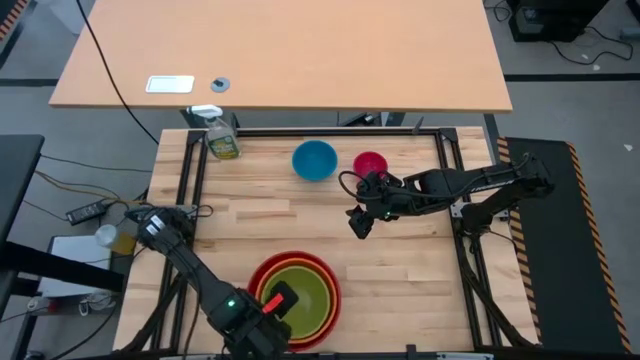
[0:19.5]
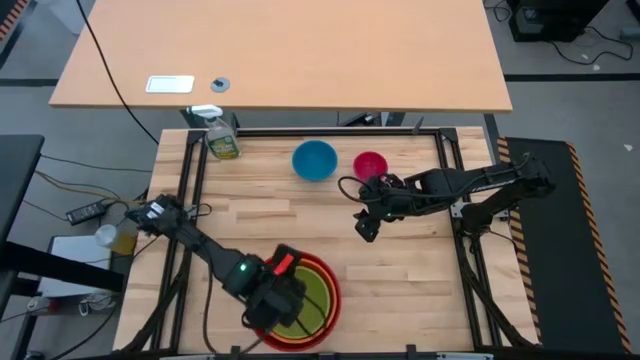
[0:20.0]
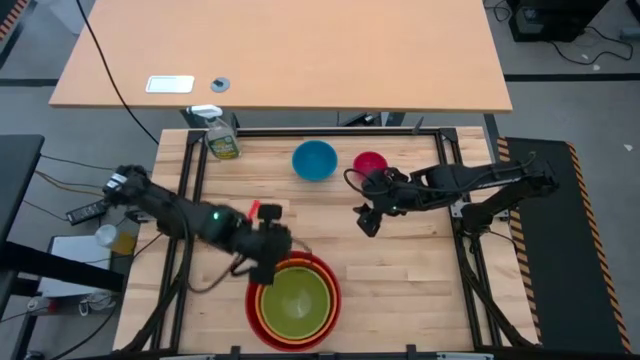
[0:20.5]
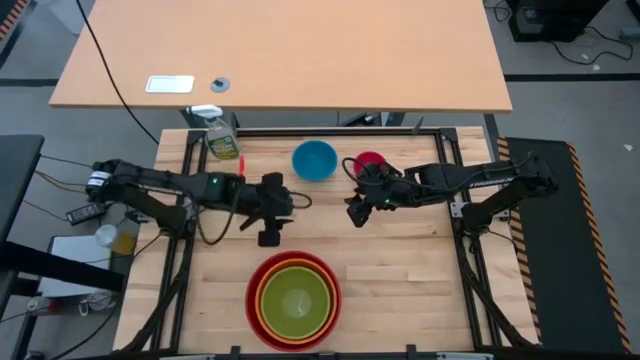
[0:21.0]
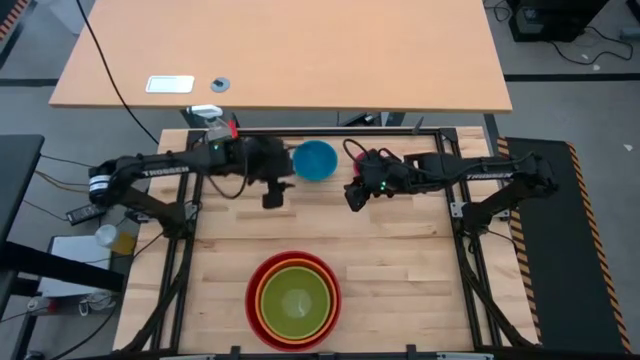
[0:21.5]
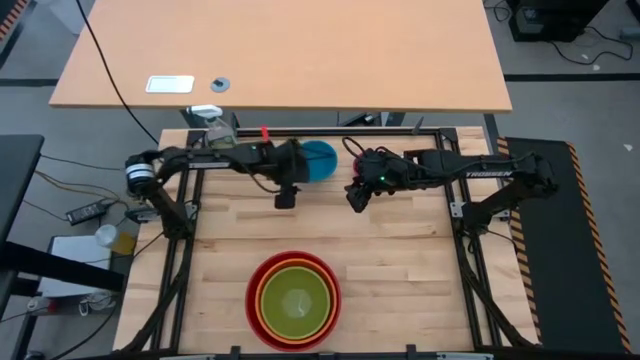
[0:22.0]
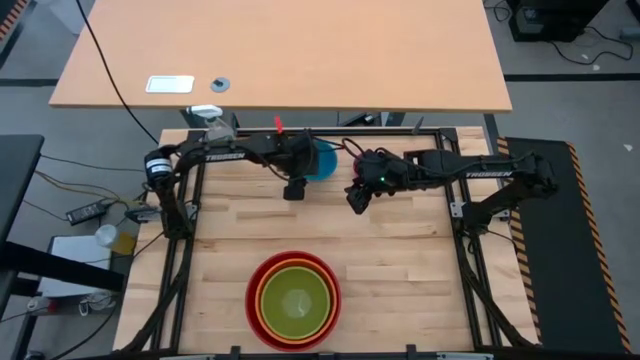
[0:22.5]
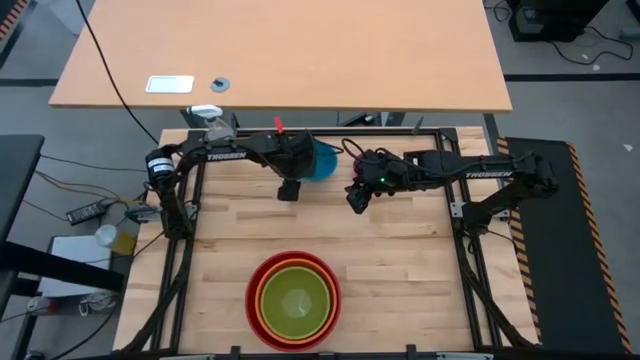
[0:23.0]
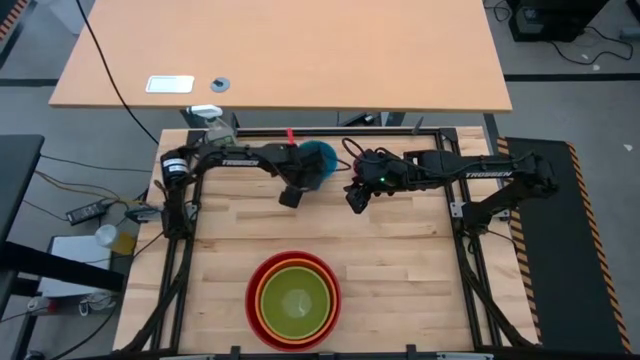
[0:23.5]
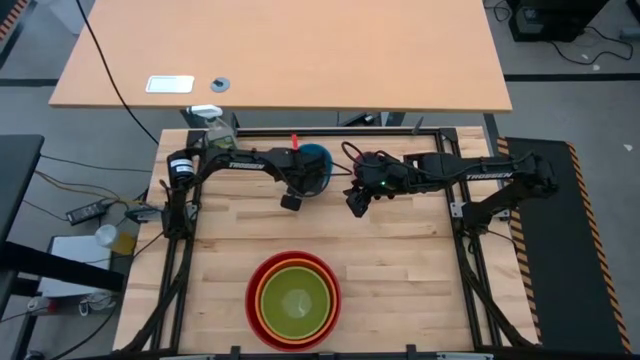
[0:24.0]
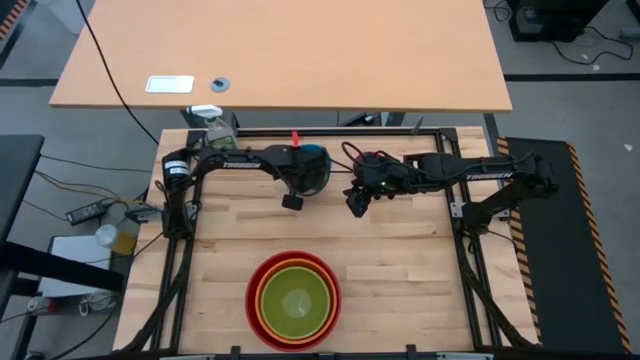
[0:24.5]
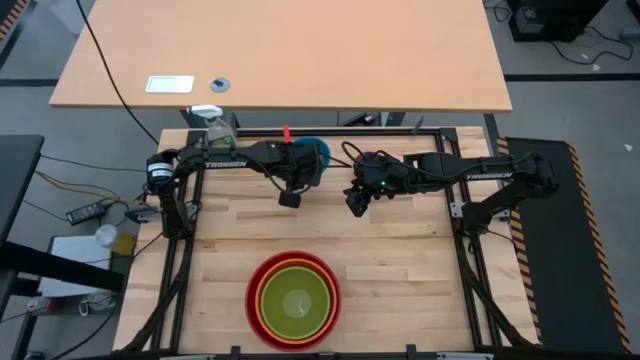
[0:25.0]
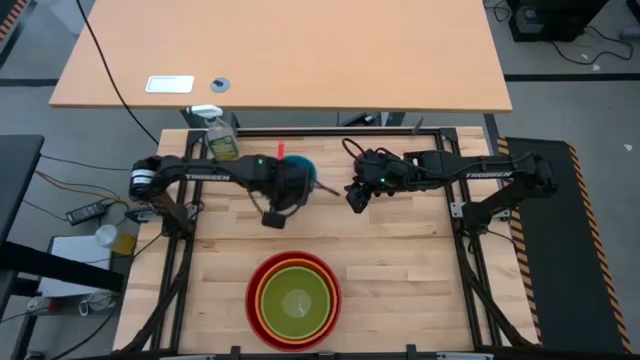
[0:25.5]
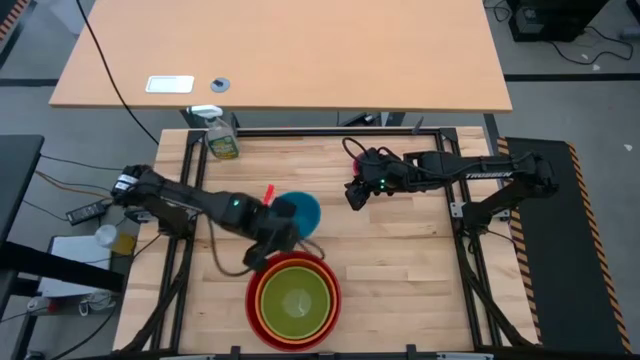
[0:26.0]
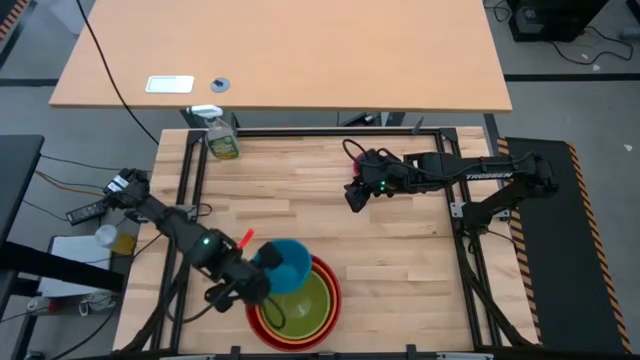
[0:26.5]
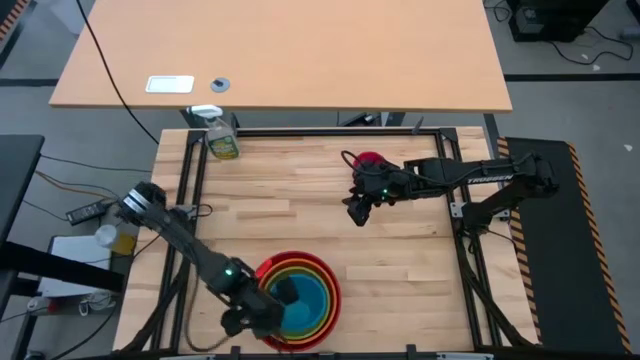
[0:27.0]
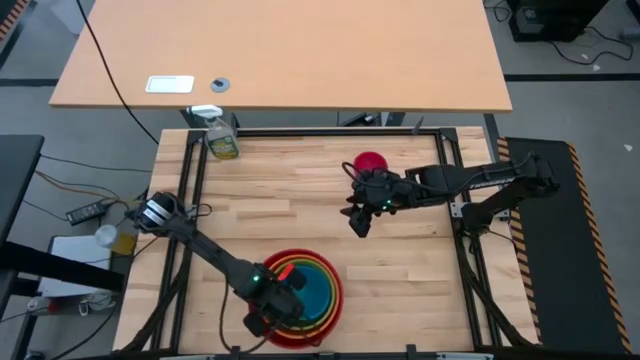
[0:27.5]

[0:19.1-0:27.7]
Stack the blue bowl into the green bowl

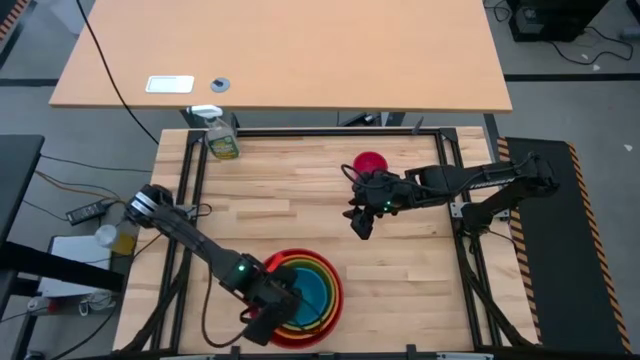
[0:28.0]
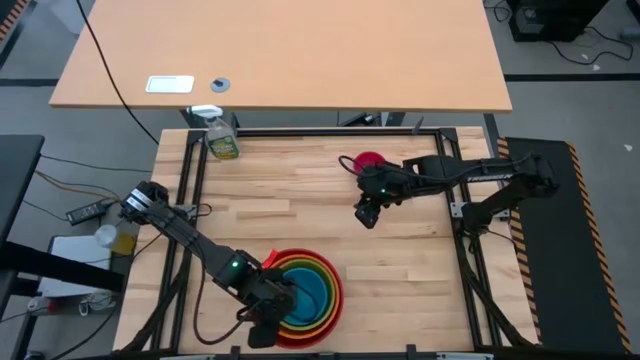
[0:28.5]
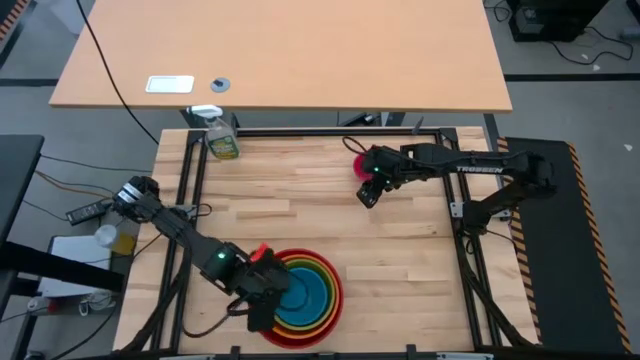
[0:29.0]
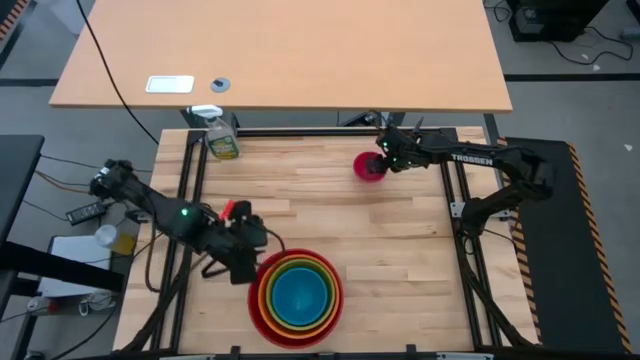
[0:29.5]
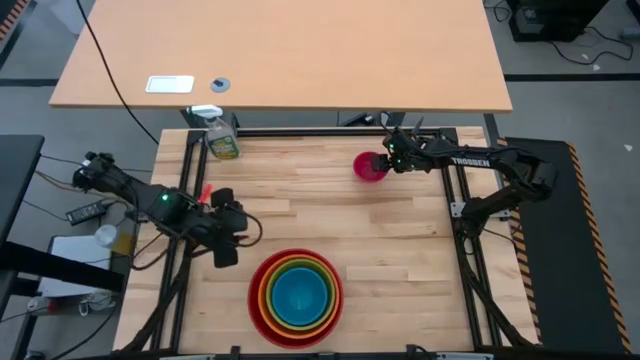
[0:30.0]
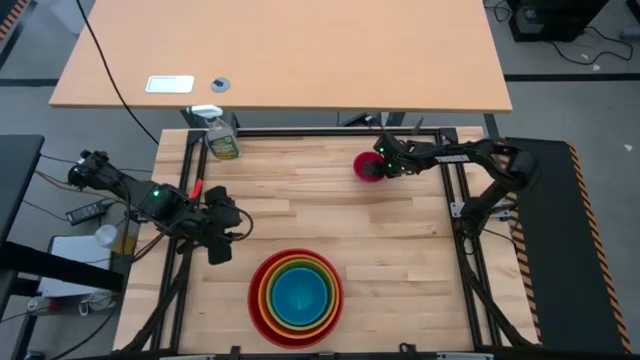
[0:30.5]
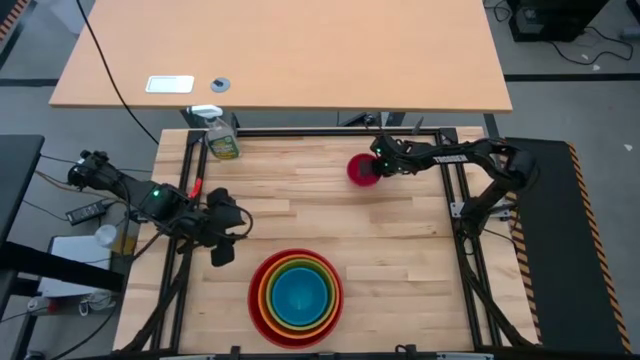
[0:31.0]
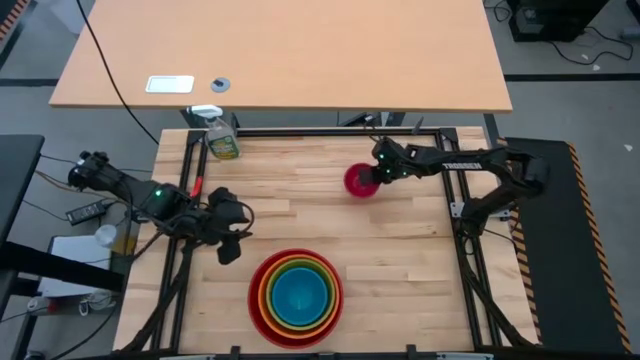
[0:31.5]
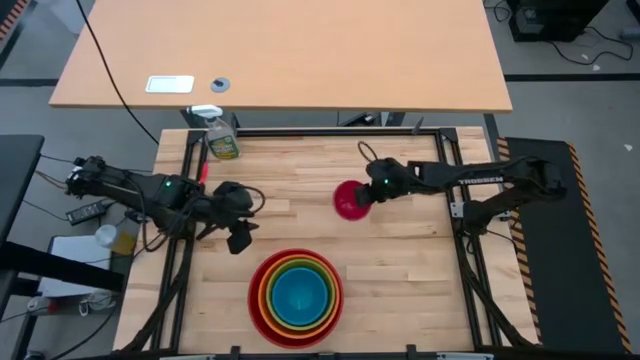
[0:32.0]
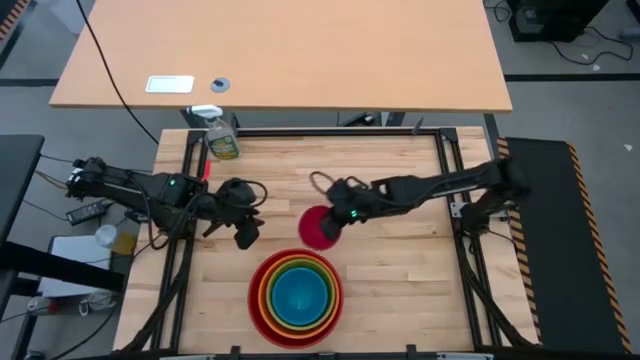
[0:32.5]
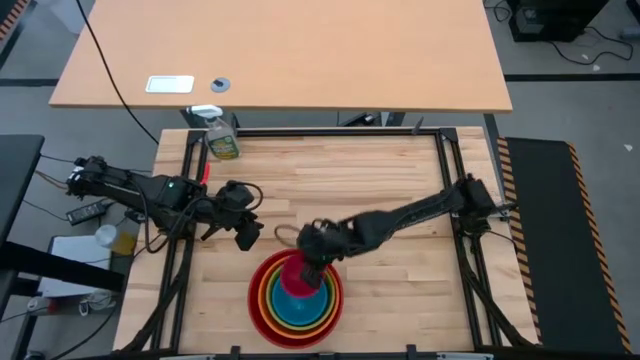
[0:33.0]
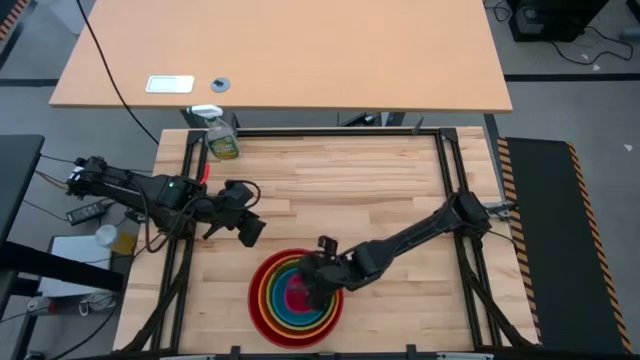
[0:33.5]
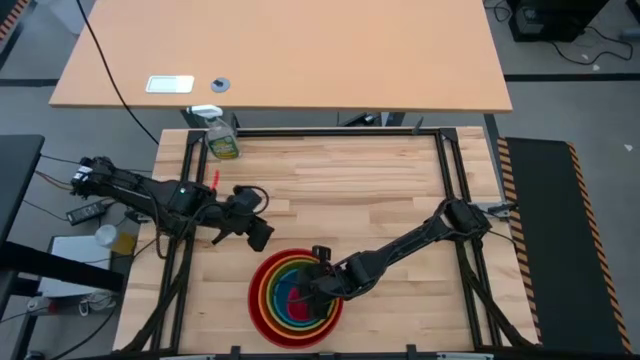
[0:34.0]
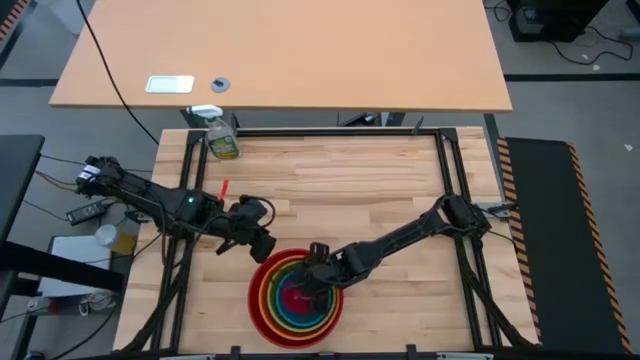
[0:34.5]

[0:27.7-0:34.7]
Stack the pink bowl into the blue bowl

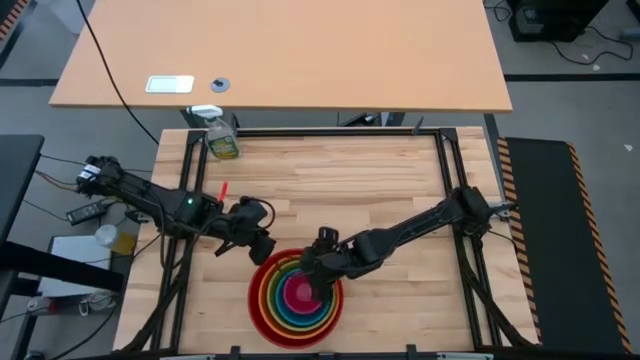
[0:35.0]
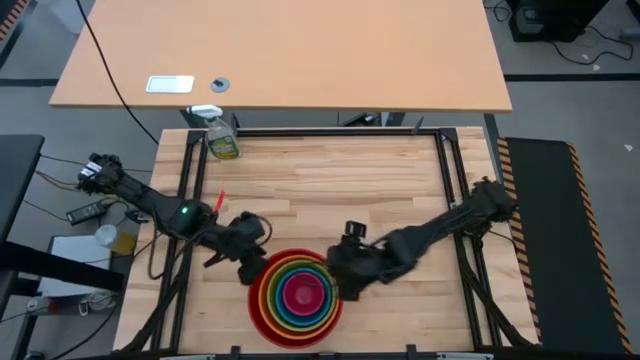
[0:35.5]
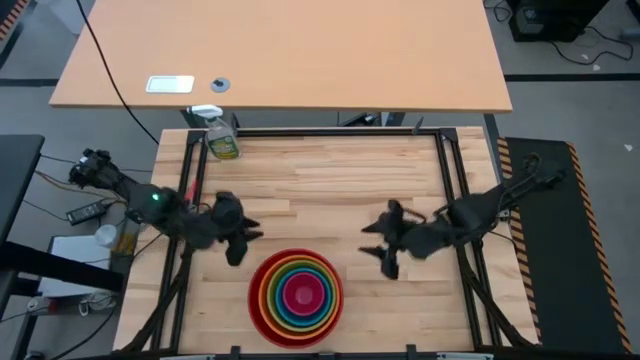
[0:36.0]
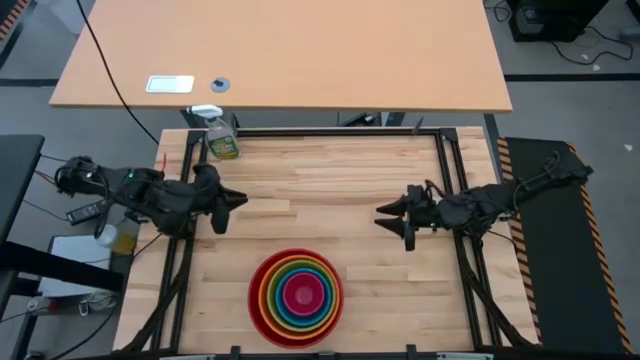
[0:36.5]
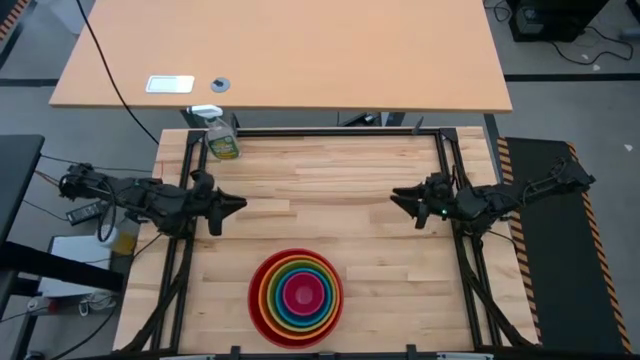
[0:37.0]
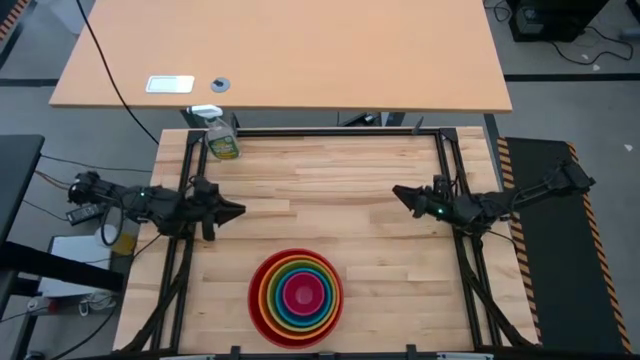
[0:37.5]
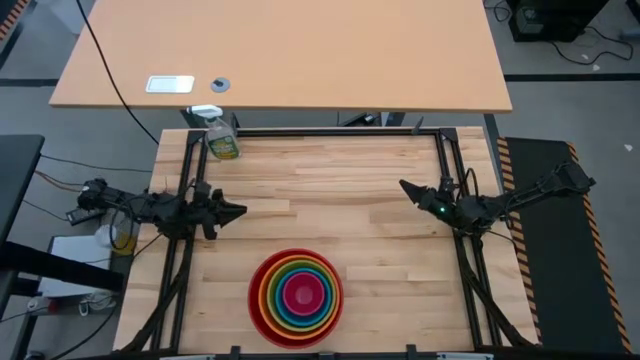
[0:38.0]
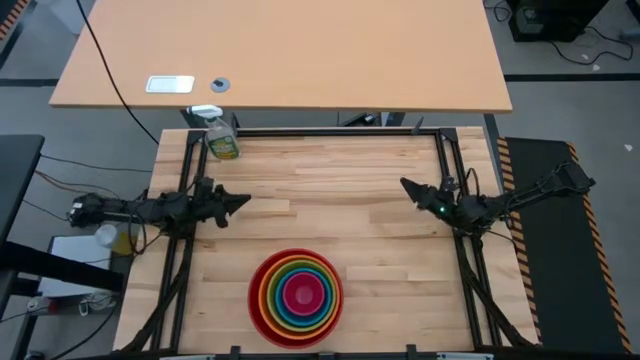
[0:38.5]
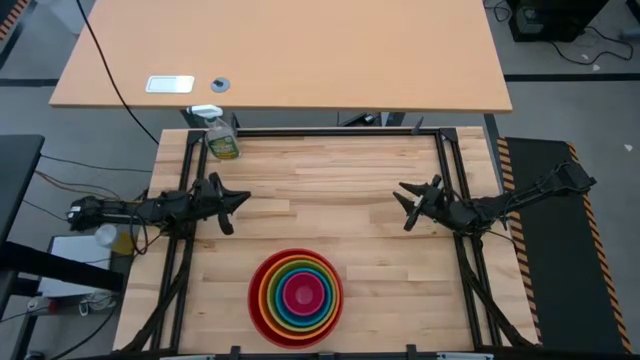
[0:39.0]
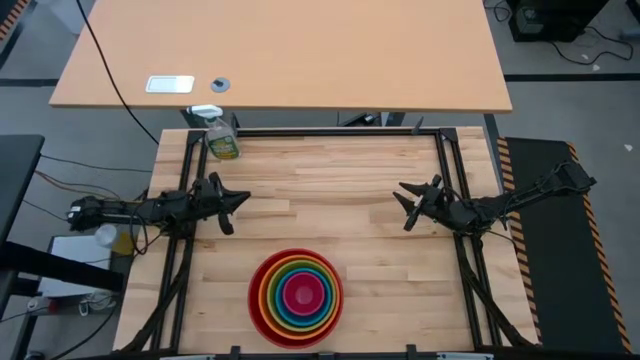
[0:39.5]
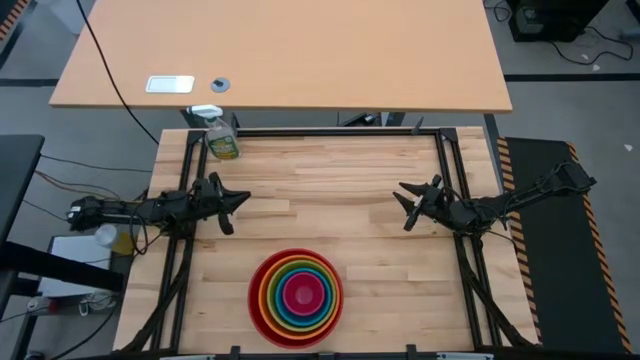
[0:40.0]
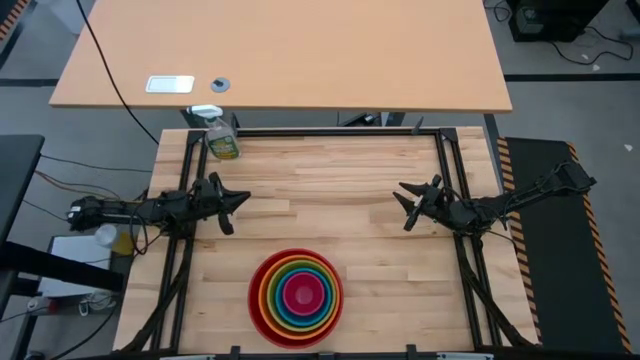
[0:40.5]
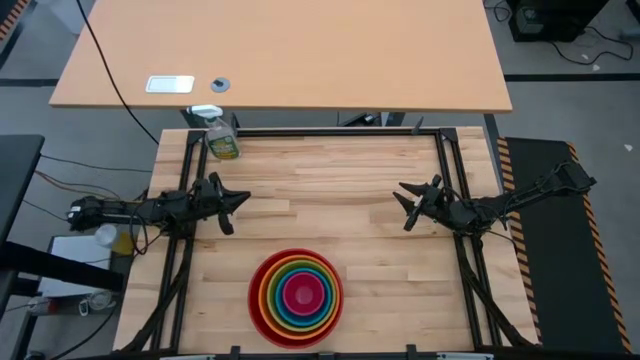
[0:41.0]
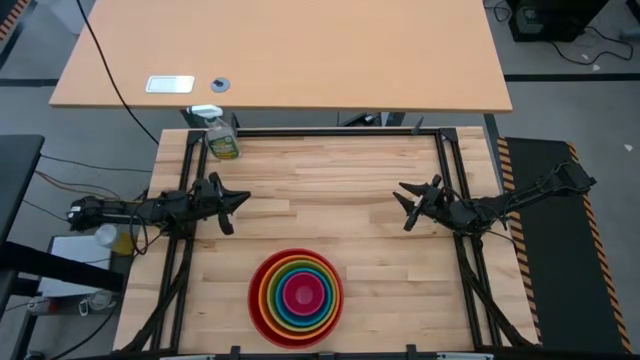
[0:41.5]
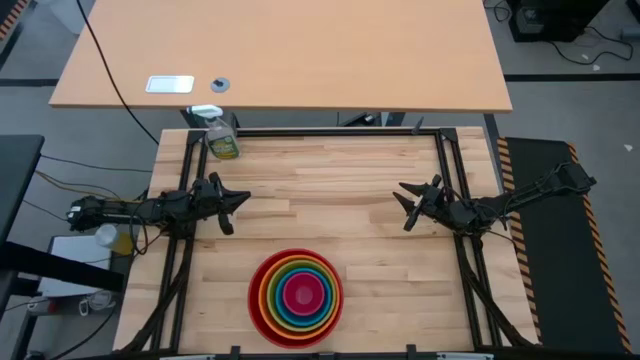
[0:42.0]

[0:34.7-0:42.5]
Return to Home Position
